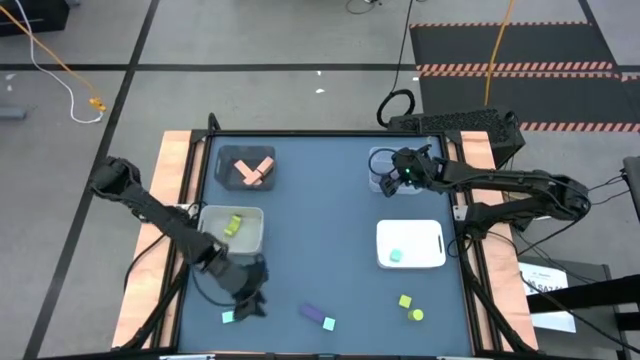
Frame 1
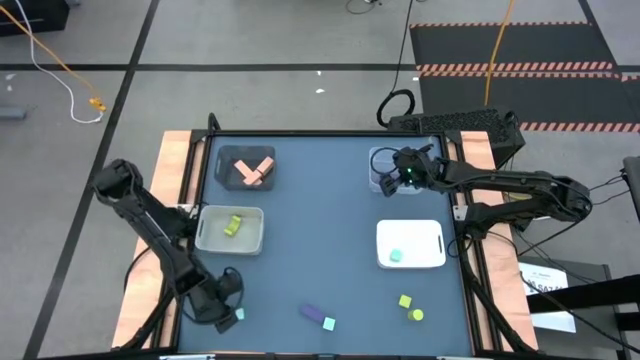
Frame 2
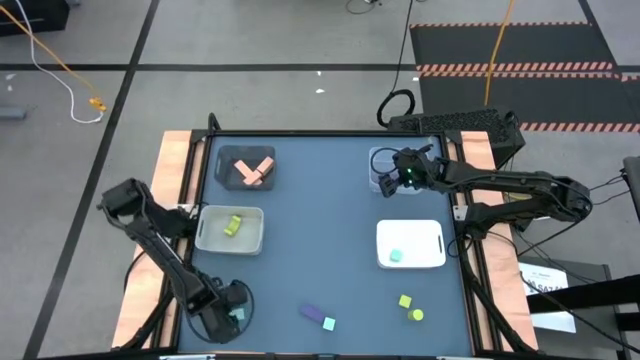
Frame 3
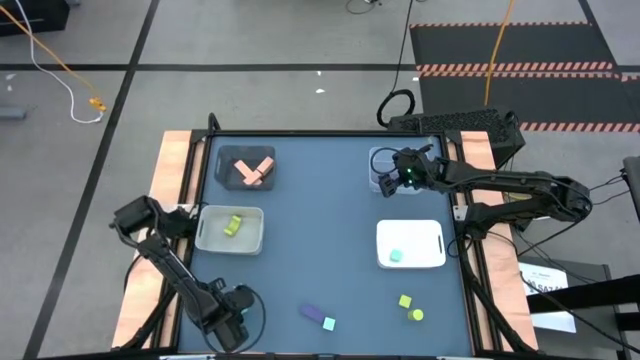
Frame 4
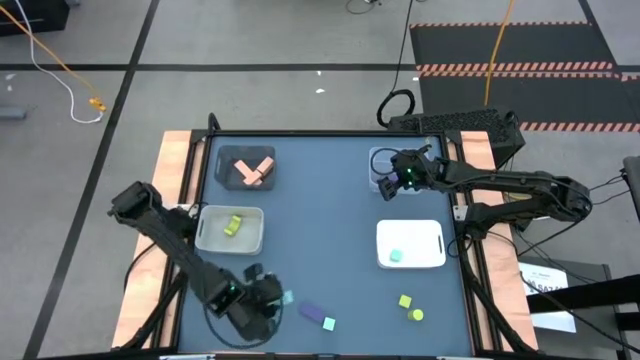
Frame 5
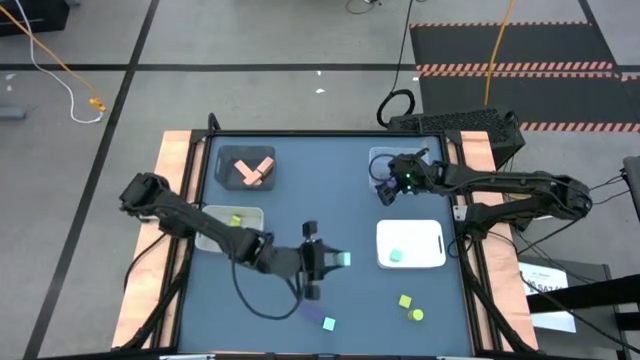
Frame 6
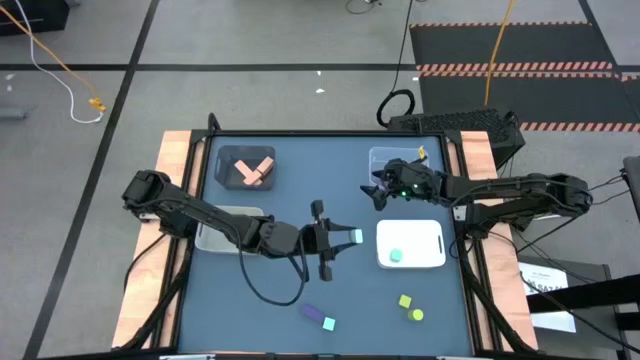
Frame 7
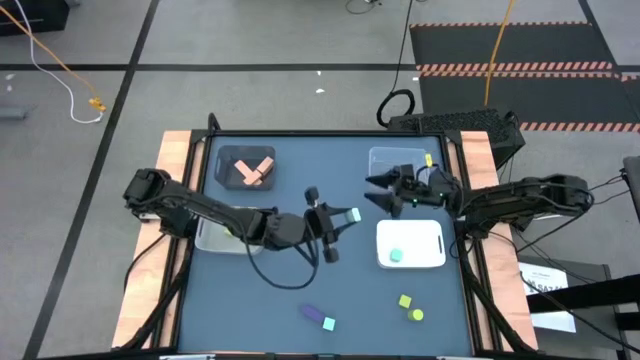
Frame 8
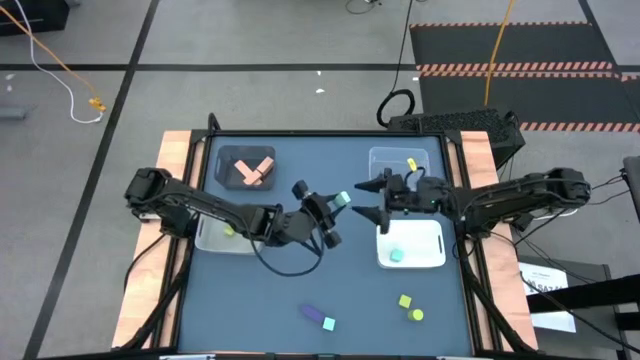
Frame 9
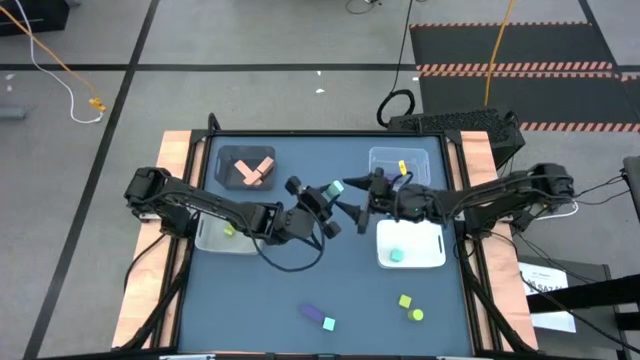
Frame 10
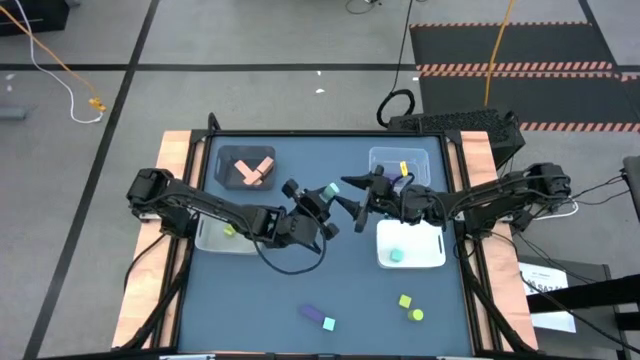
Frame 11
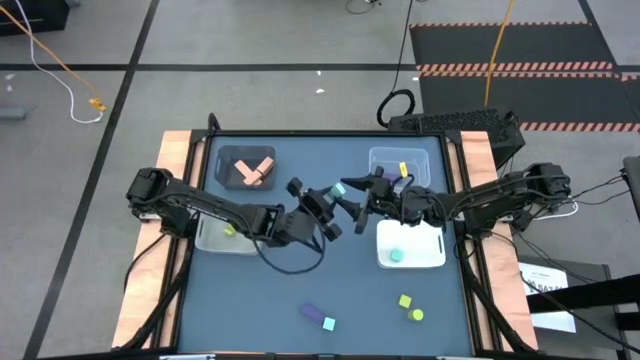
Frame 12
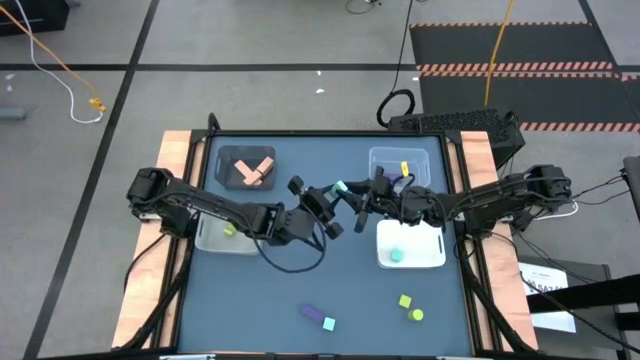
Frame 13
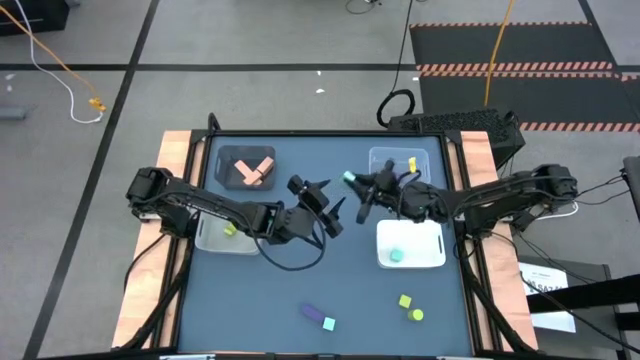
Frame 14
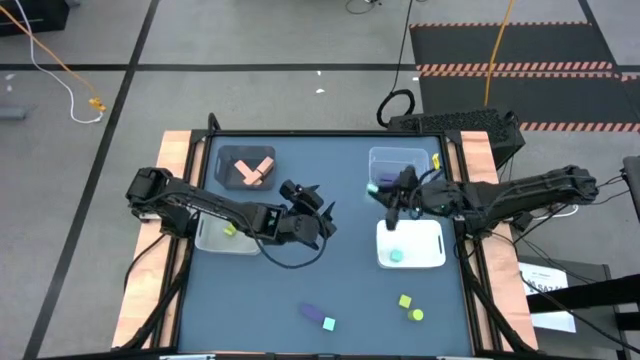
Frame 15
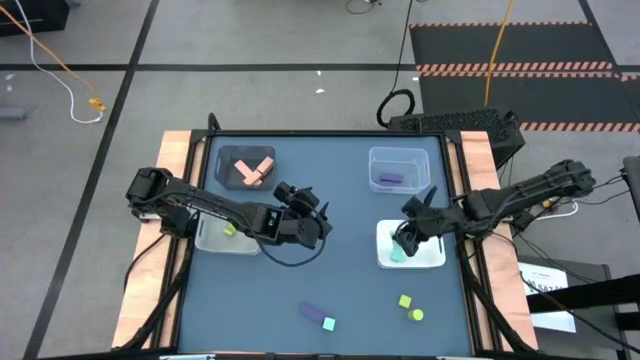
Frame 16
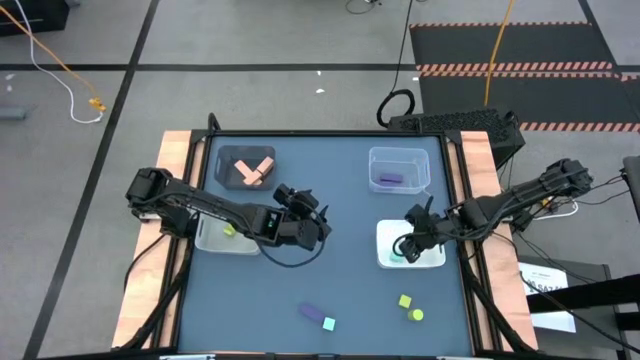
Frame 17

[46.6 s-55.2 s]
Task: Sort & place blocks by color
Put the left blue block into the white bin

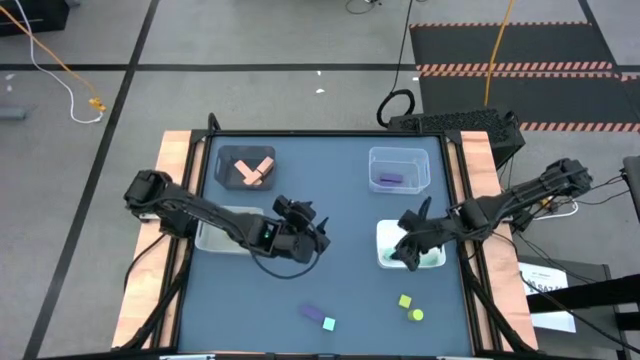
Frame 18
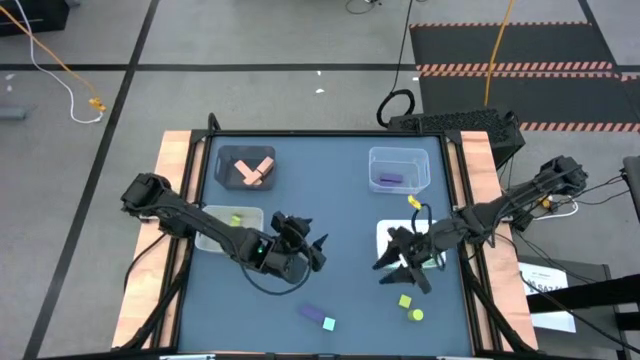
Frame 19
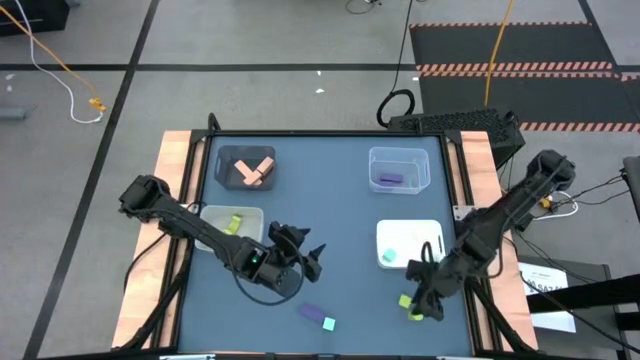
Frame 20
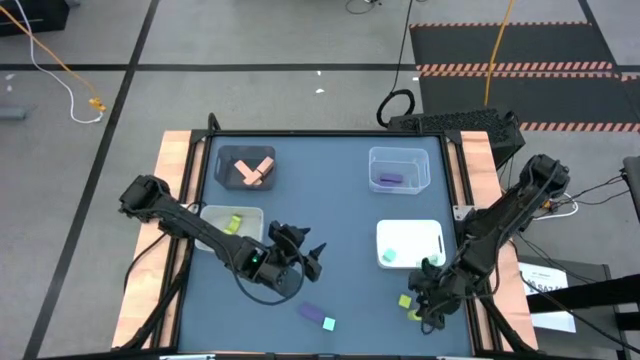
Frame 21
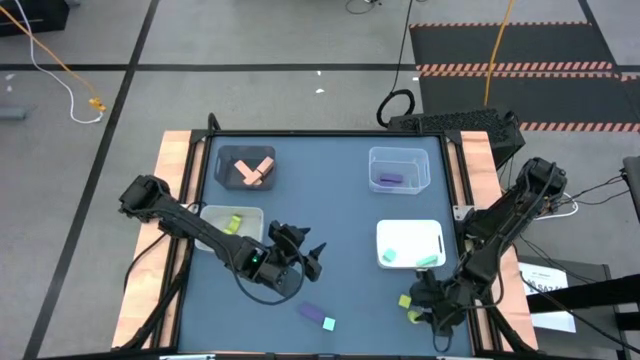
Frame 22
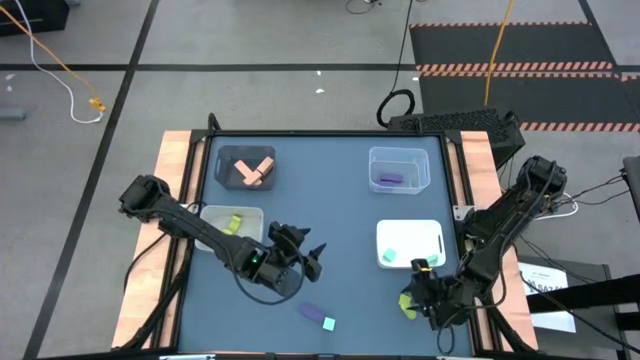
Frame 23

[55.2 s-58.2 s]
Put the bottom green block into the gray bin

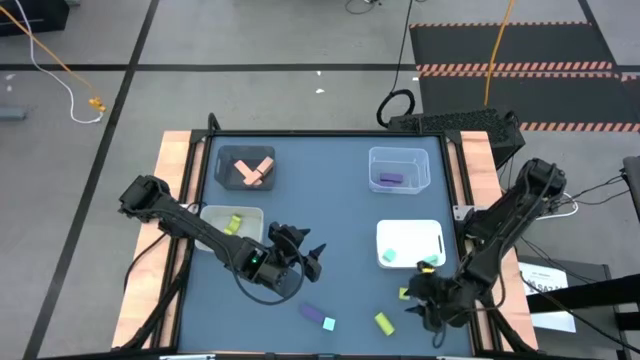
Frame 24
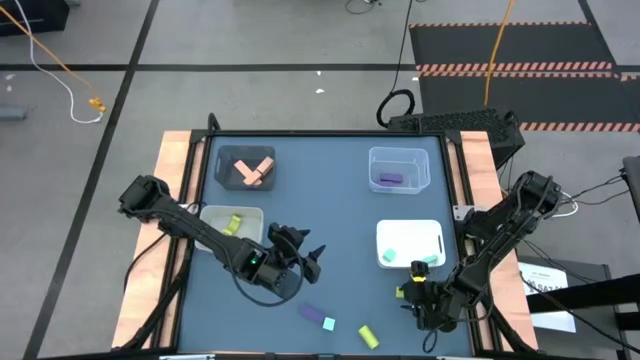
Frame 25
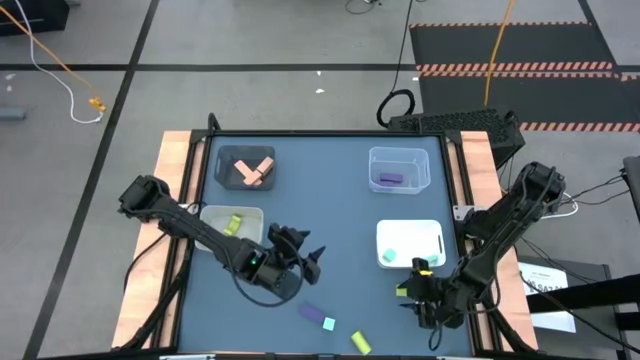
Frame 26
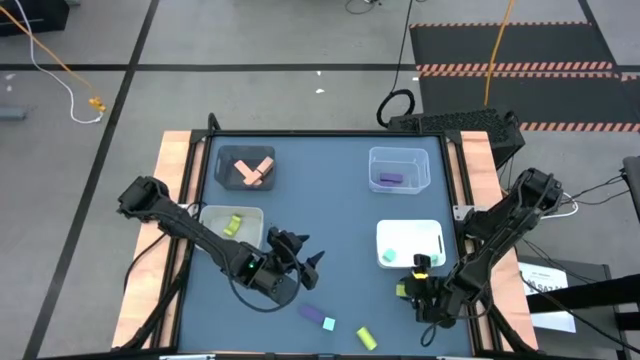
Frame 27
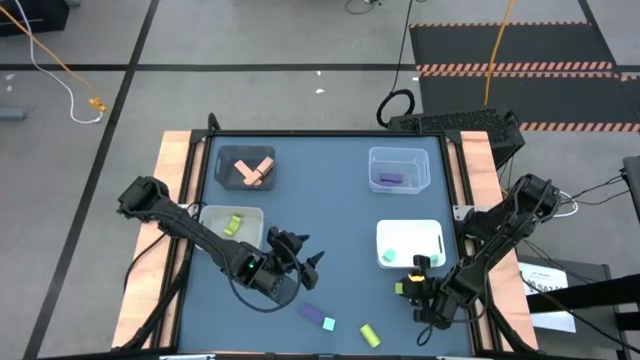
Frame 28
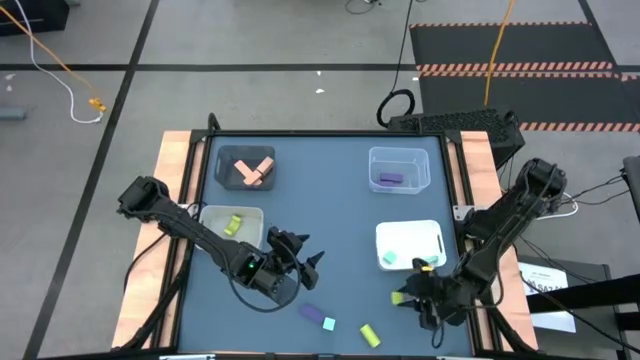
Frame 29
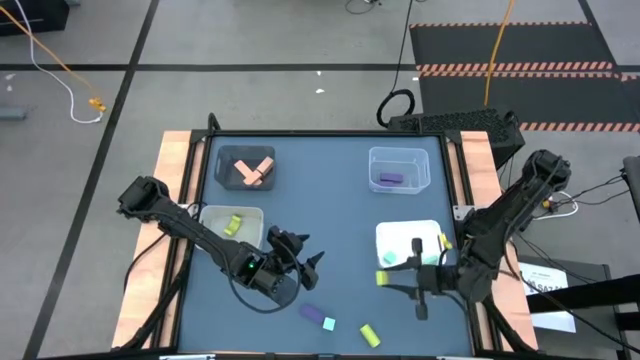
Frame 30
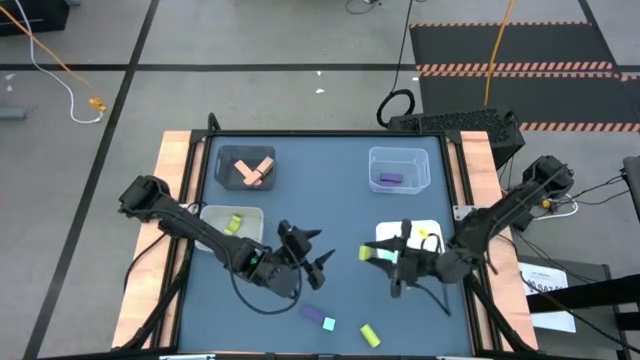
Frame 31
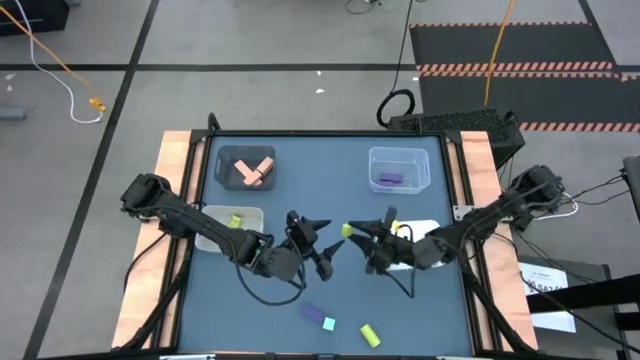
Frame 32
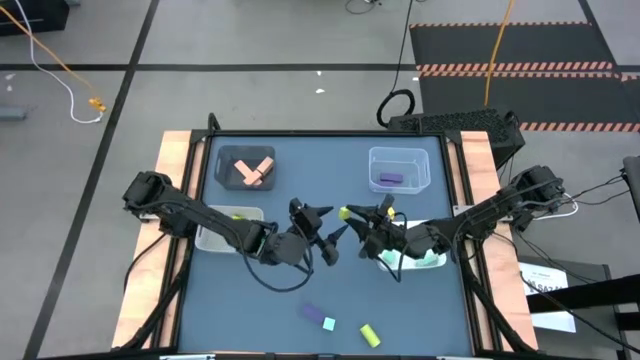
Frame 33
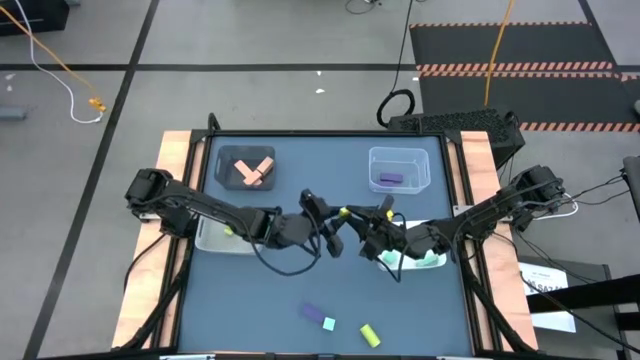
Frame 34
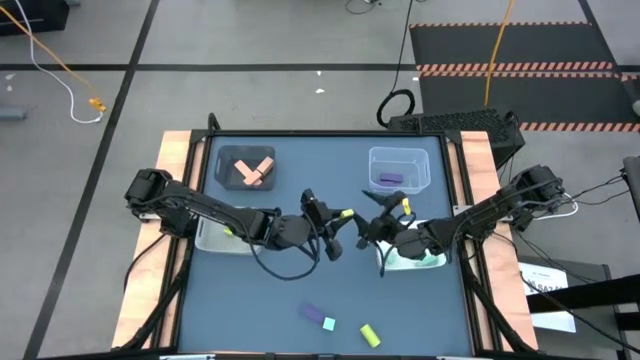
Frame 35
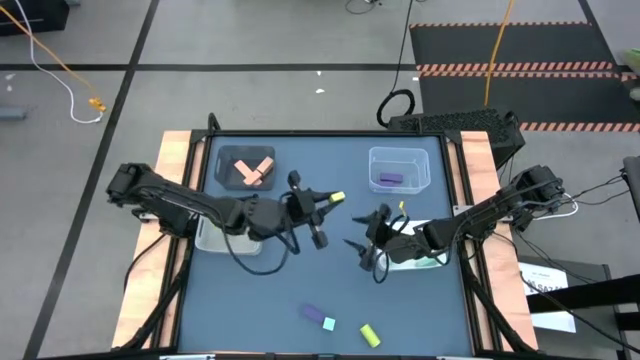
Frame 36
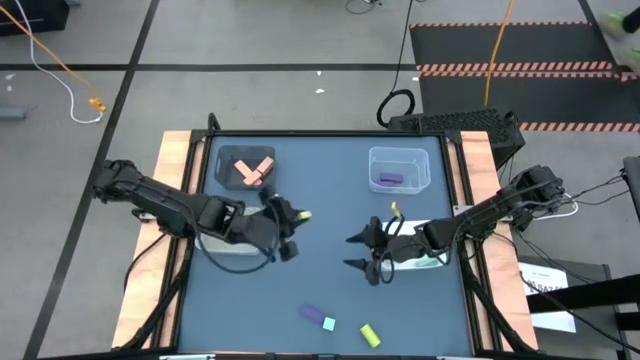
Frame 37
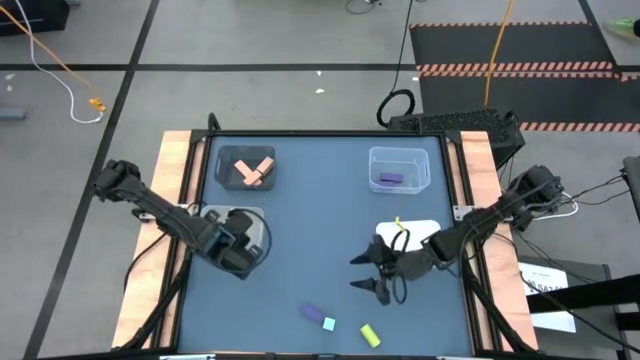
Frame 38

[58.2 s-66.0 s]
Put the top green block into the gray bin

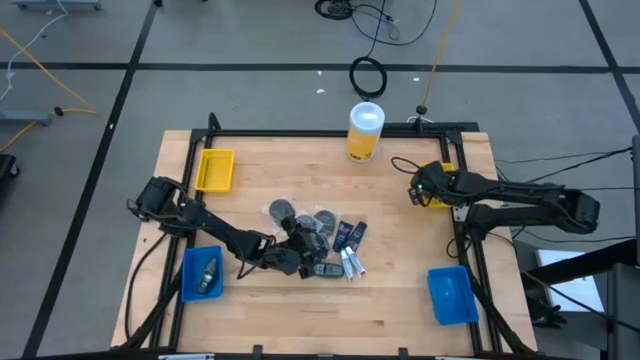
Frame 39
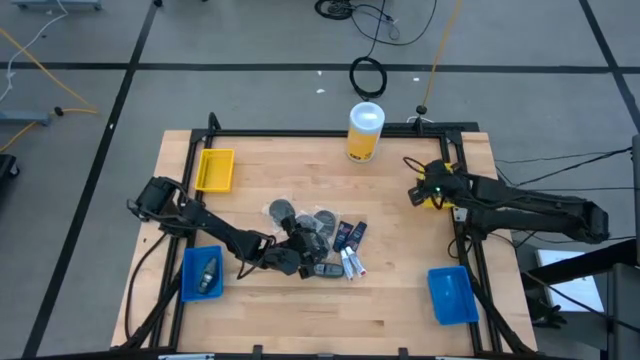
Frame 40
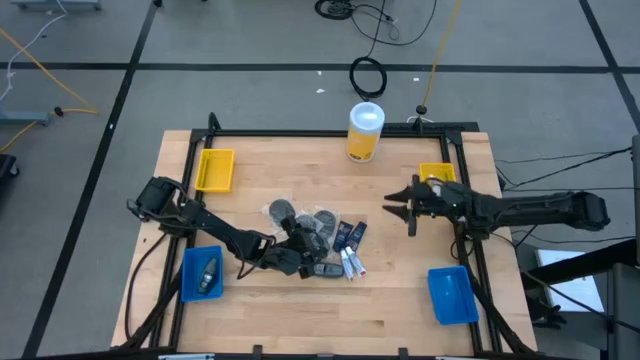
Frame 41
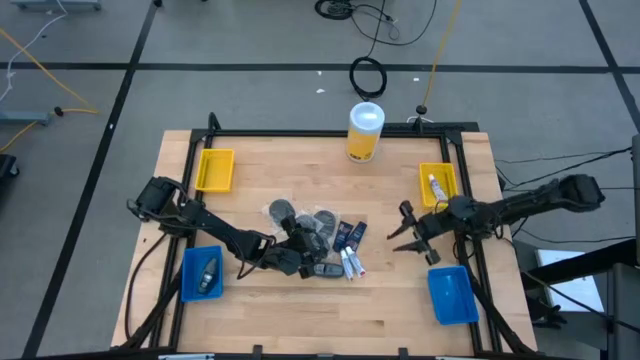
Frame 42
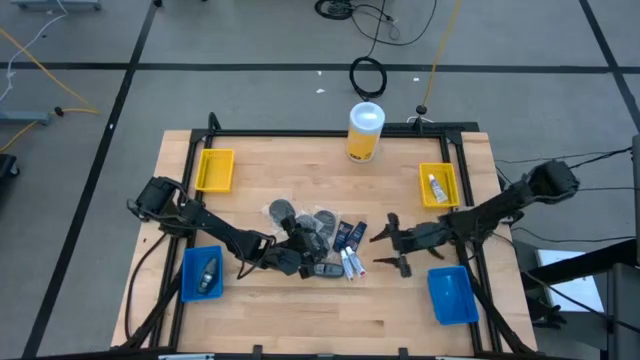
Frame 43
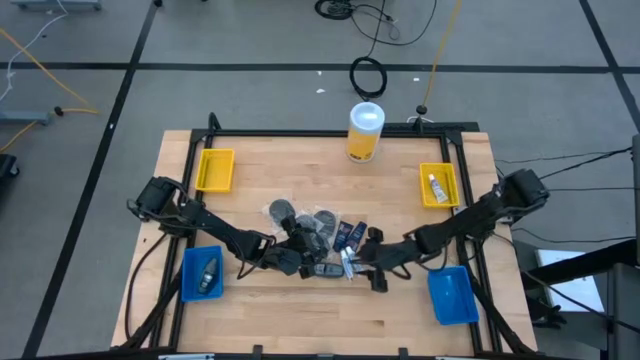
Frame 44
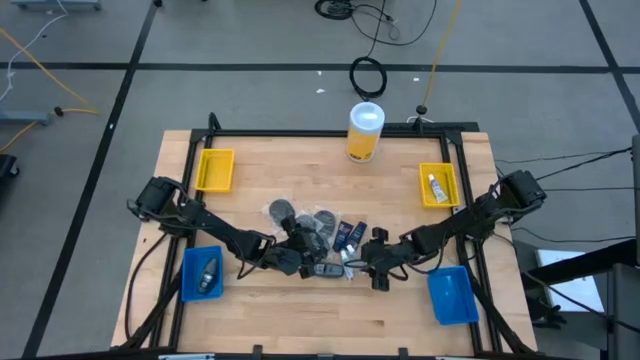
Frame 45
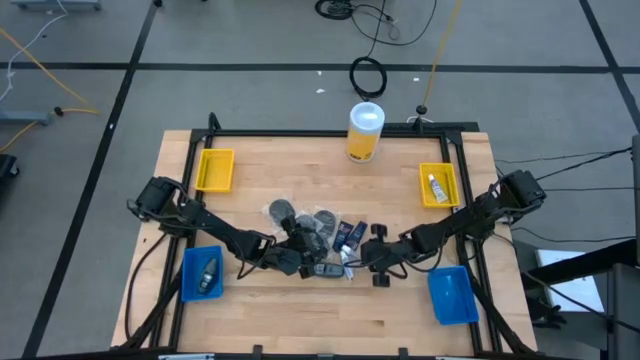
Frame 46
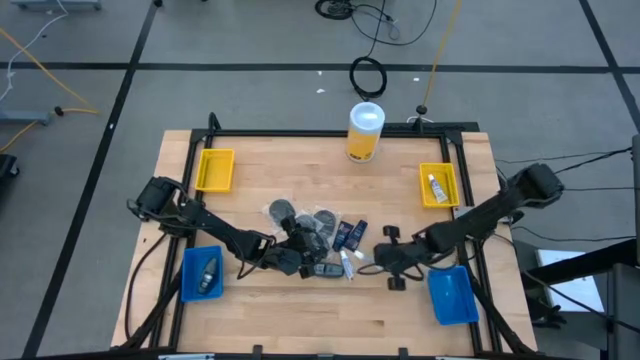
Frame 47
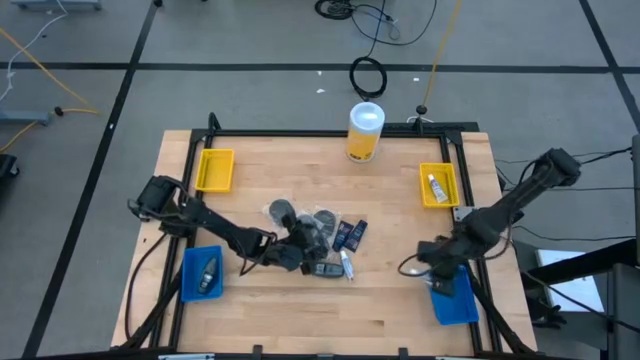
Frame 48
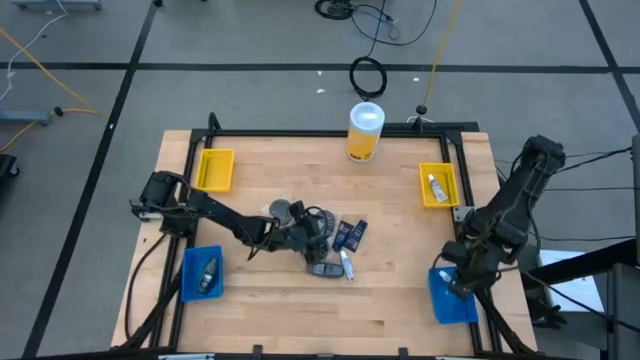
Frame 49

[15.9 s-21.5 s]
Task: Pick & Place Travel size toiletries
Put the white toothpaste into the right yellow bin
